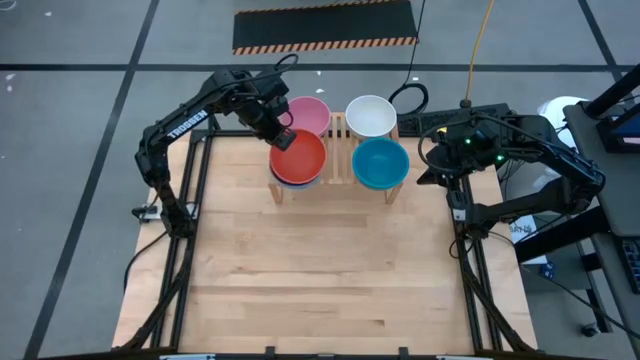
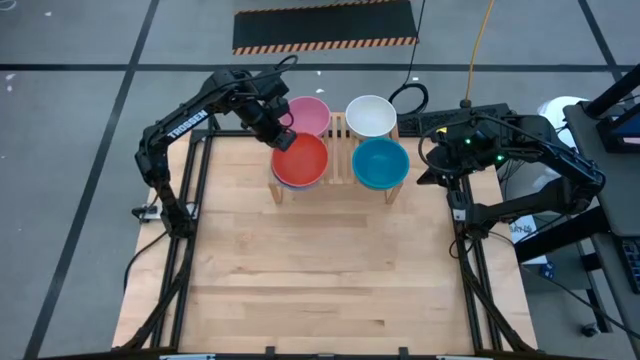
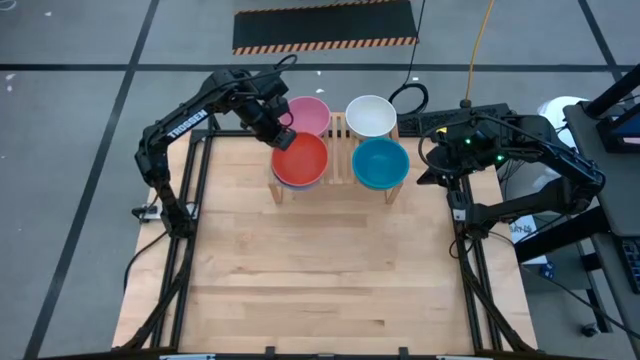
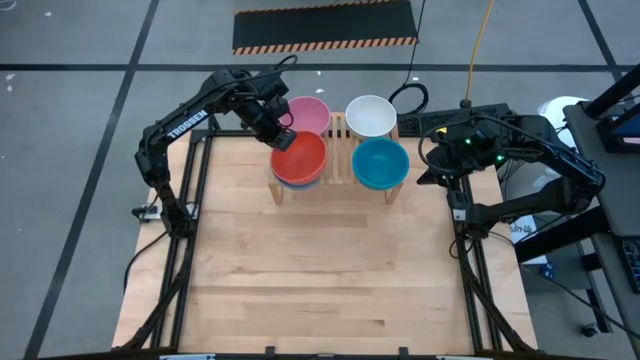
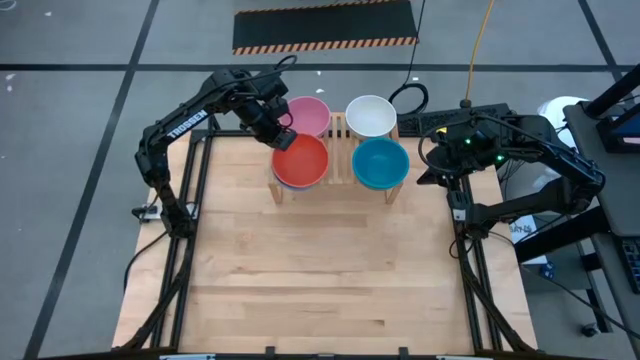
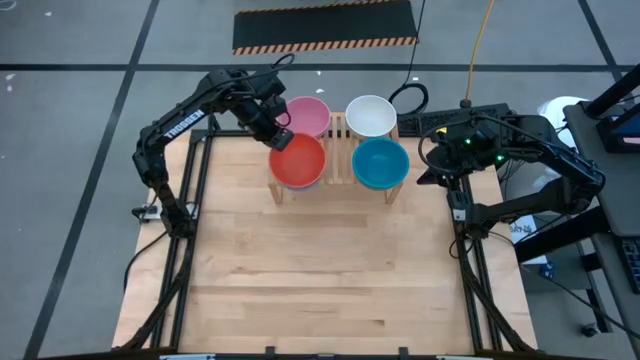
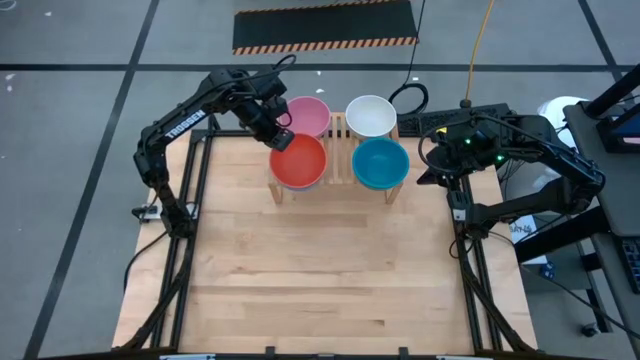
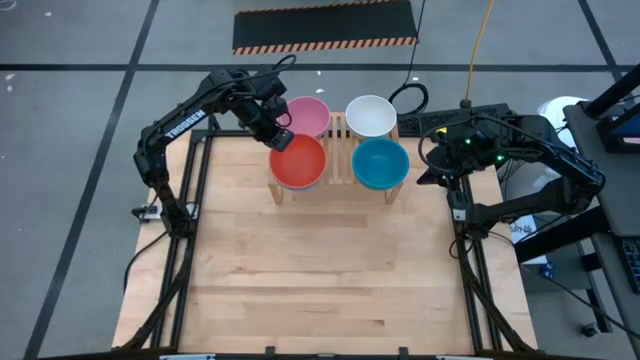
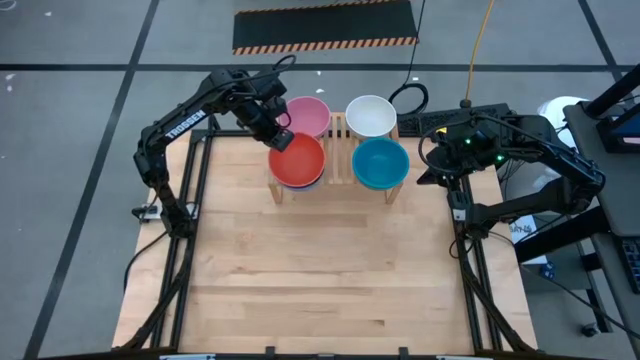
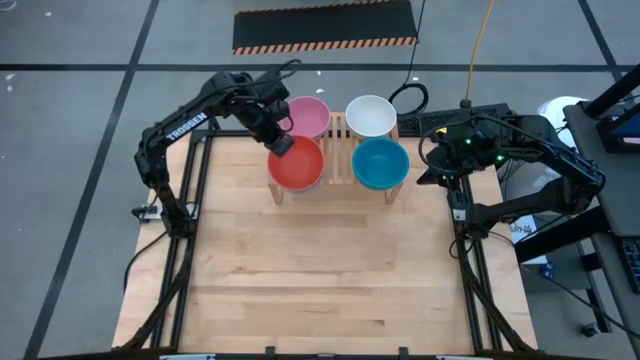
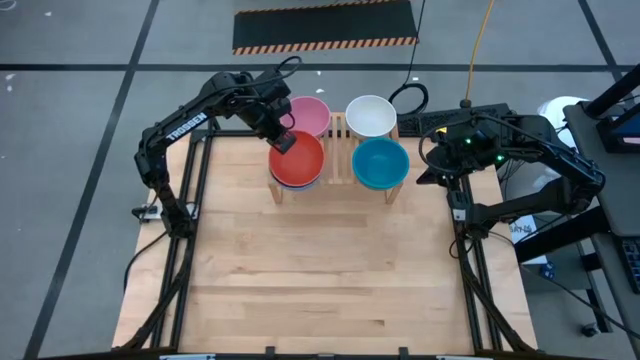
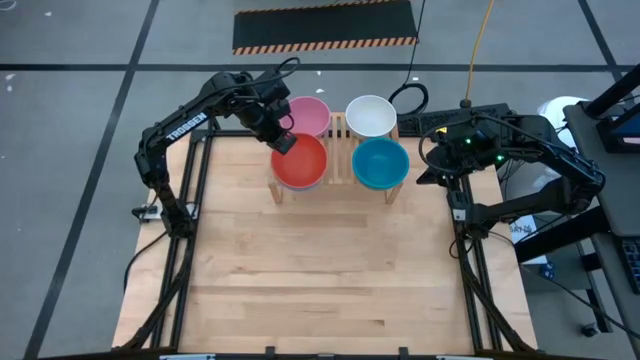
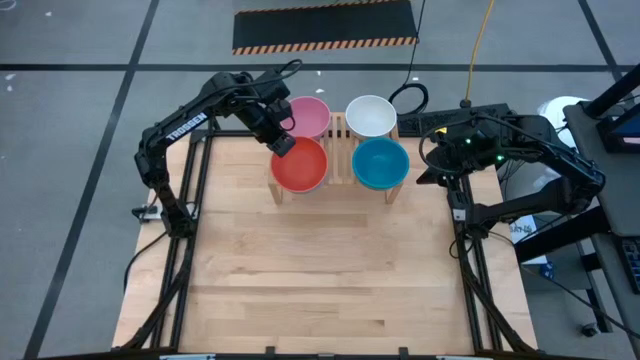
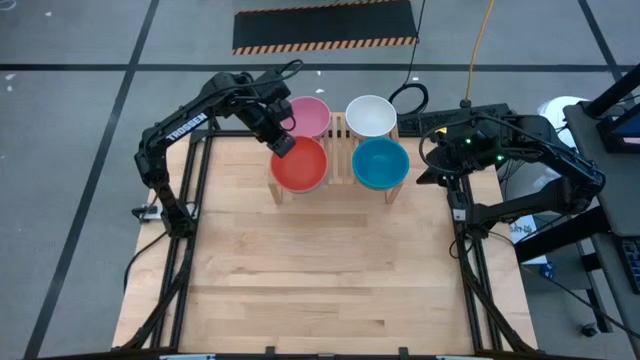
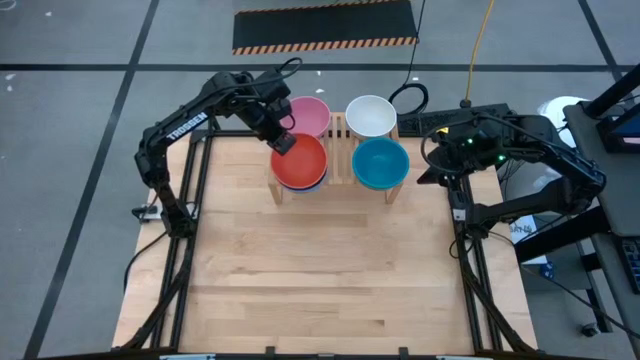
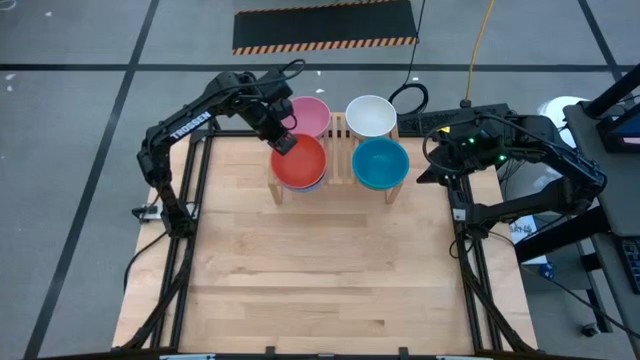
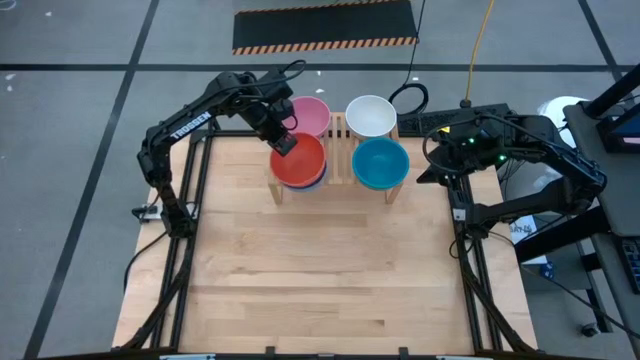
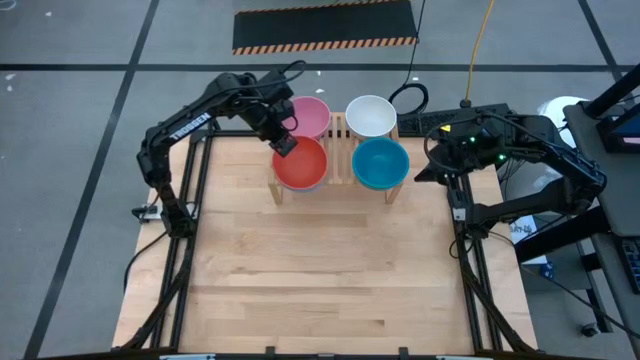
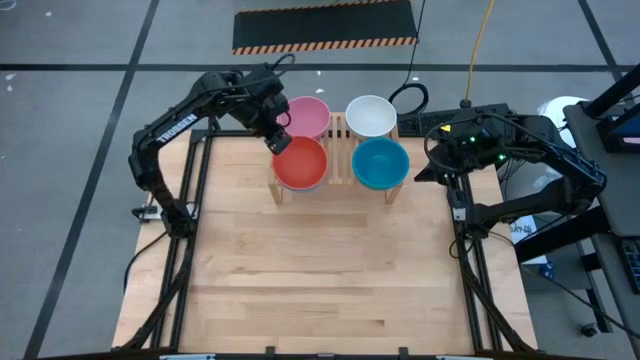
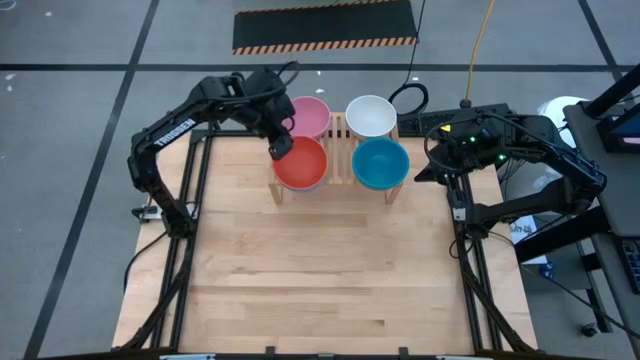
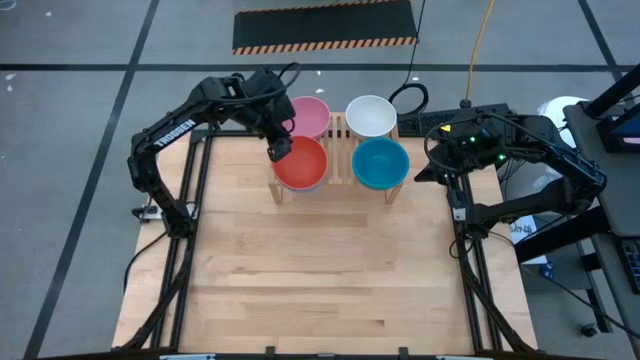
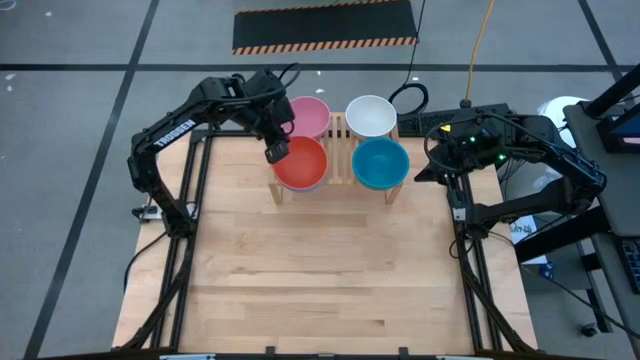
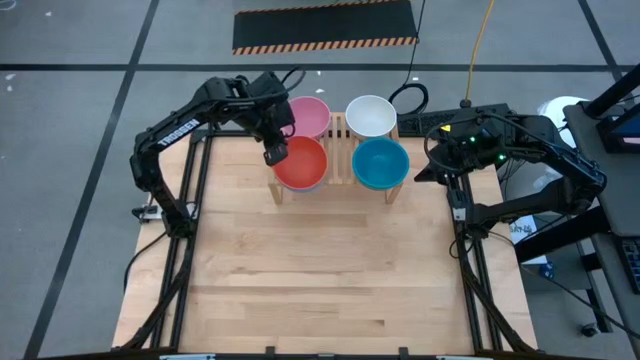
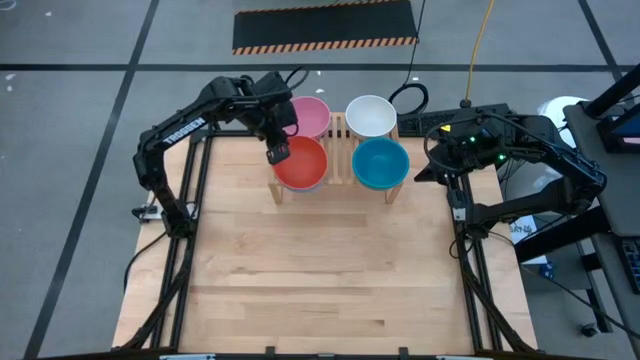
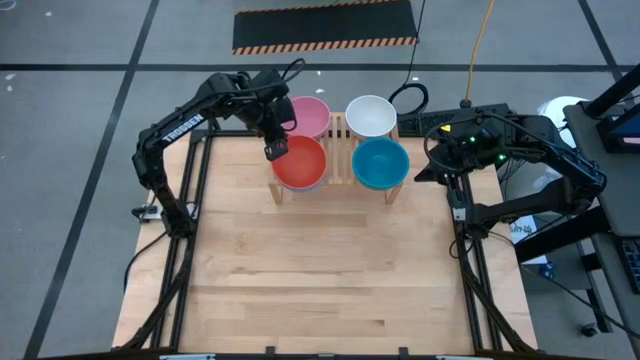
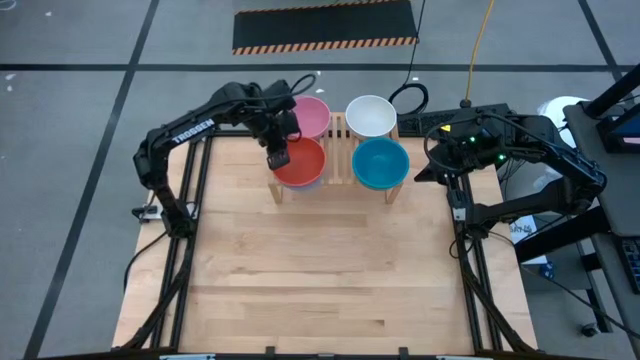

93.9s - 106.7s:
Task: Place and stack bowls onto a shelf
Stack the orange bowl on top of the left blue bowl on the shelf

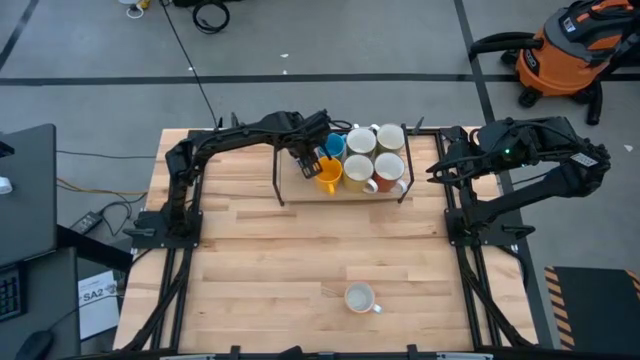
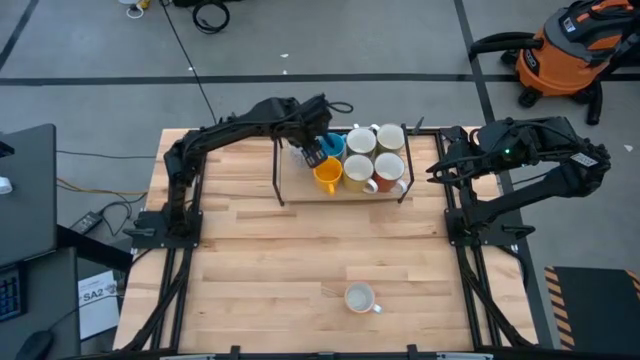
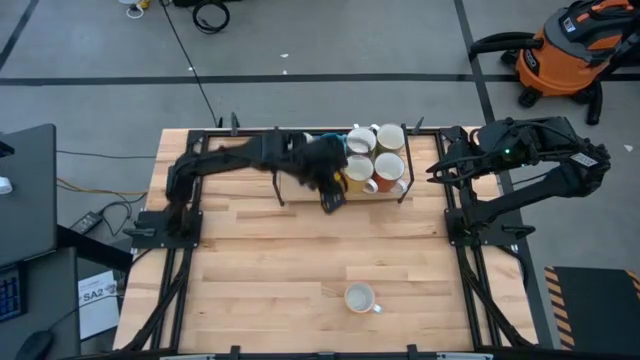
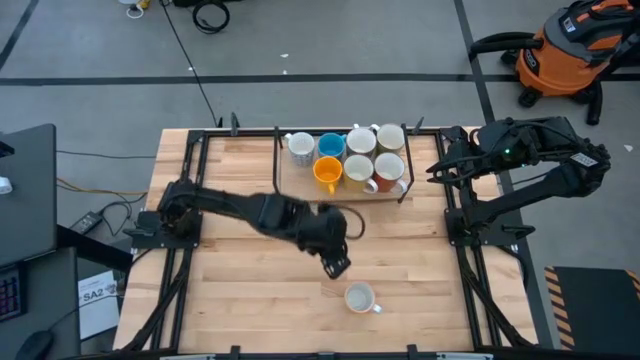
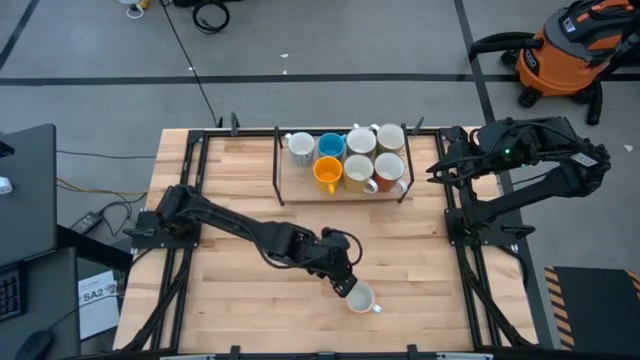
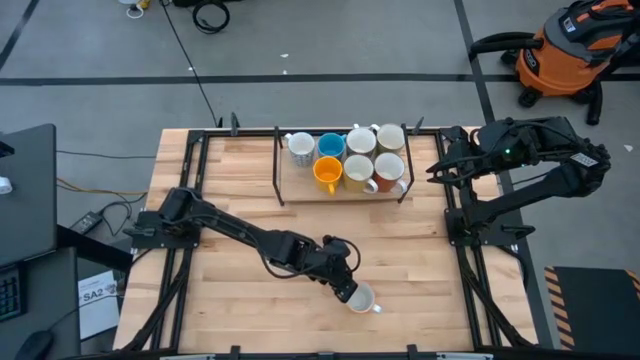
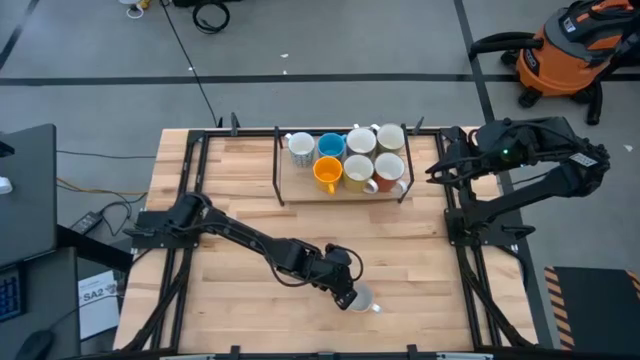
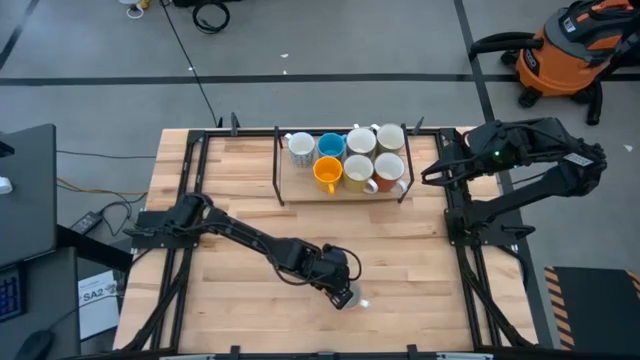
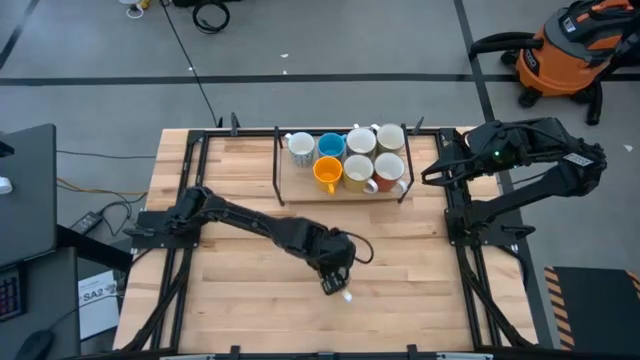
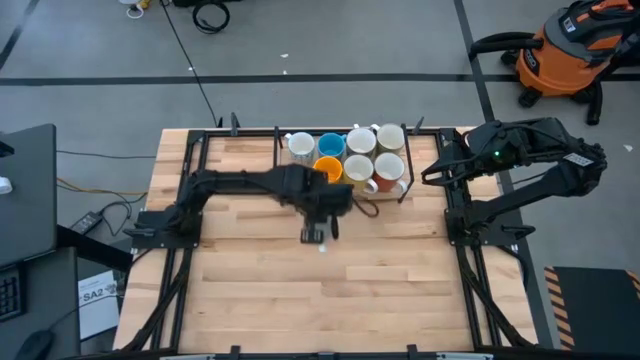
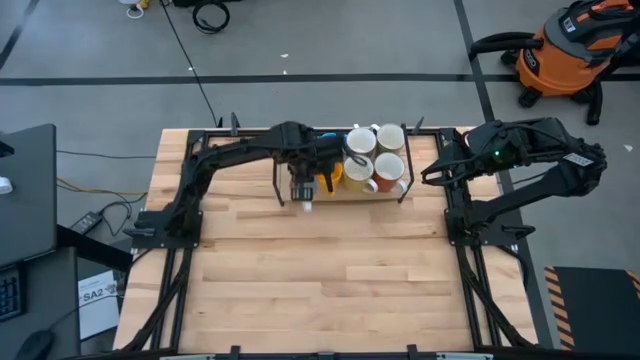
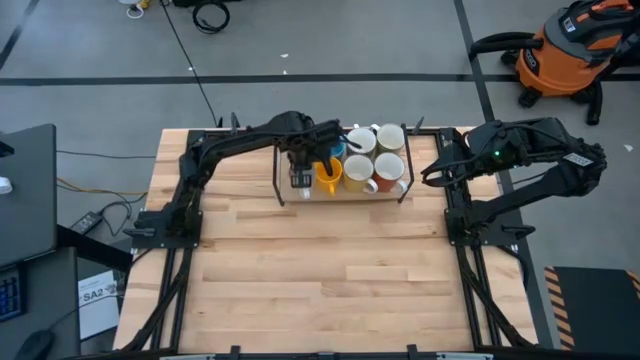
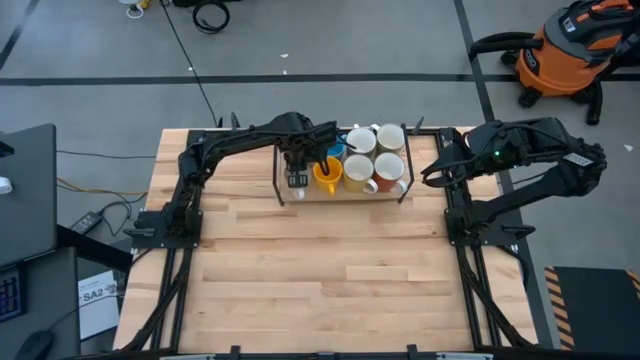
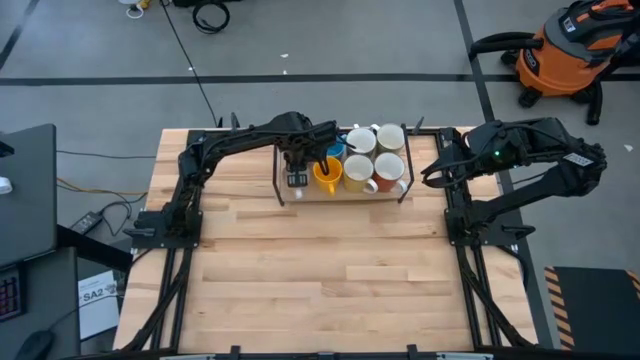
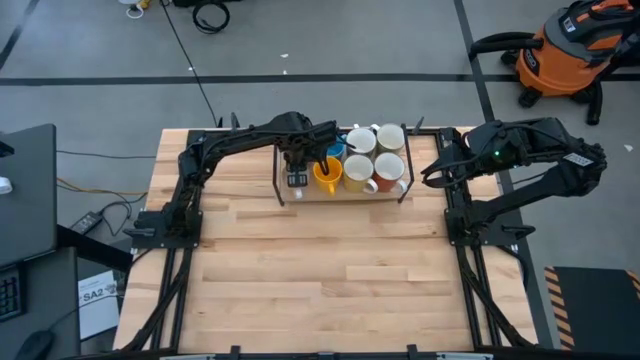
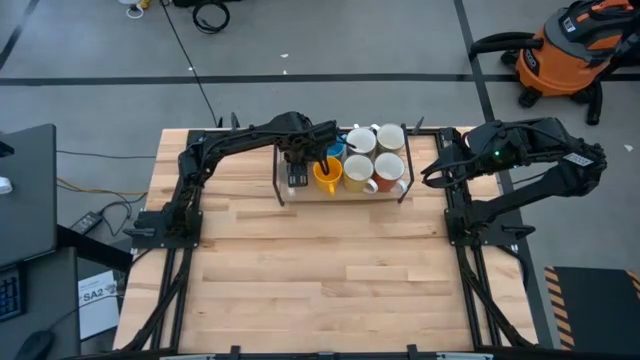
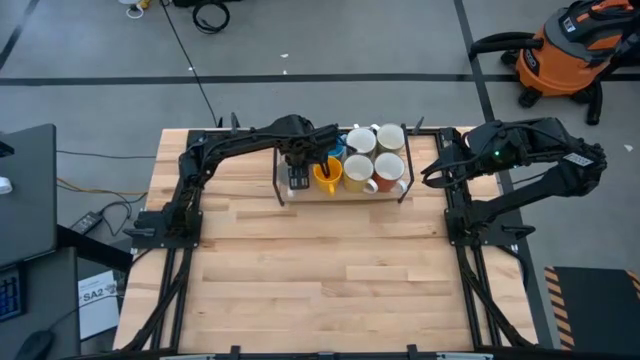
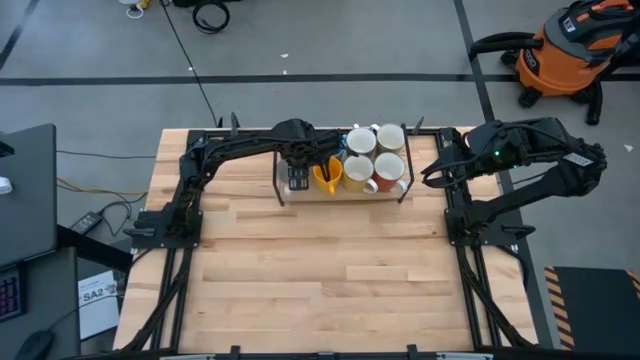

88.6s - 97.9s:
Task: Place coffee mugs
Put the orange cup on the shelf aligned with the blue cup
